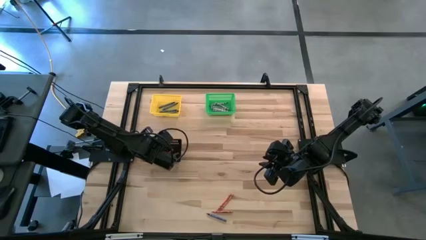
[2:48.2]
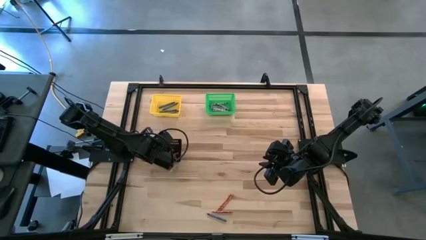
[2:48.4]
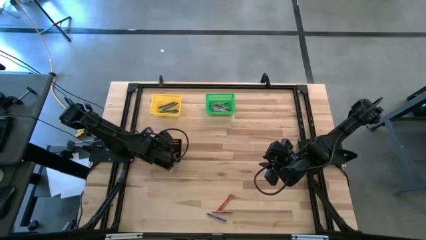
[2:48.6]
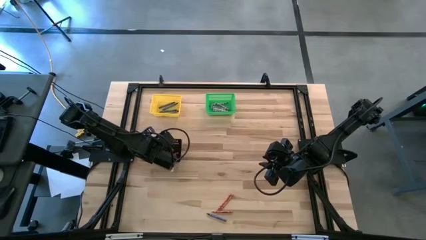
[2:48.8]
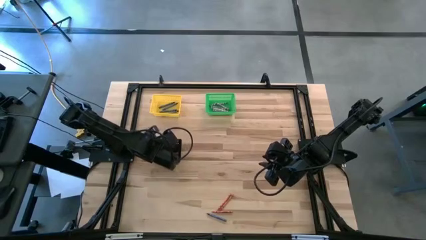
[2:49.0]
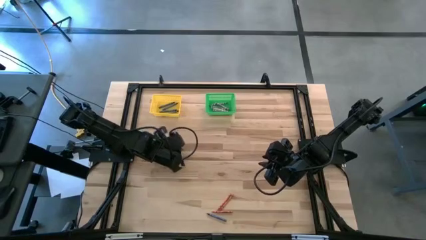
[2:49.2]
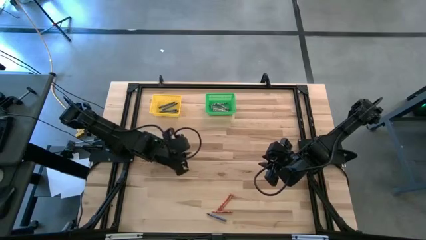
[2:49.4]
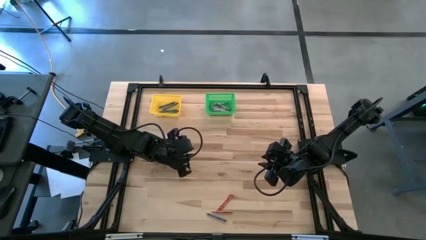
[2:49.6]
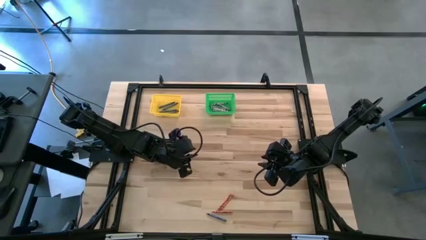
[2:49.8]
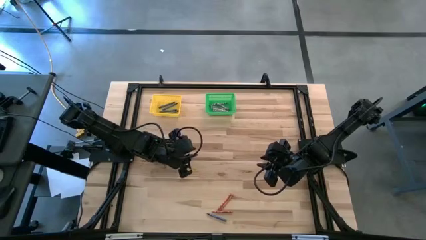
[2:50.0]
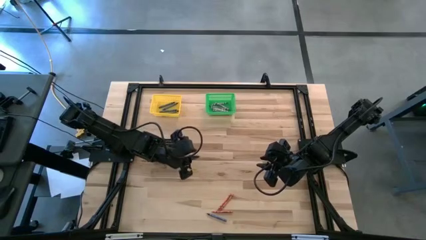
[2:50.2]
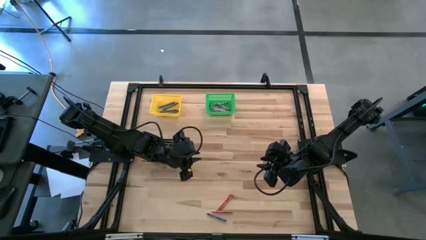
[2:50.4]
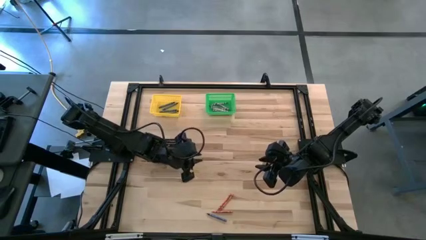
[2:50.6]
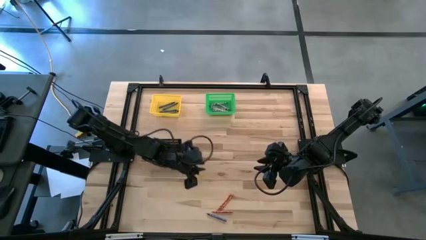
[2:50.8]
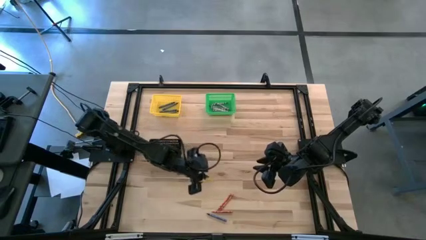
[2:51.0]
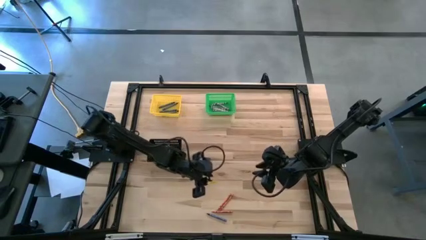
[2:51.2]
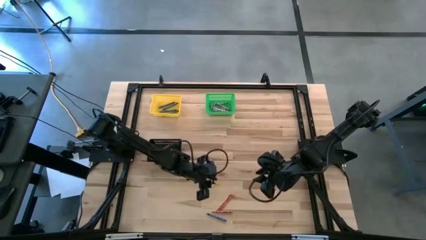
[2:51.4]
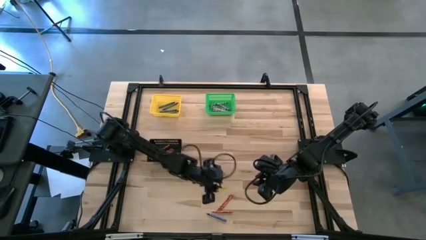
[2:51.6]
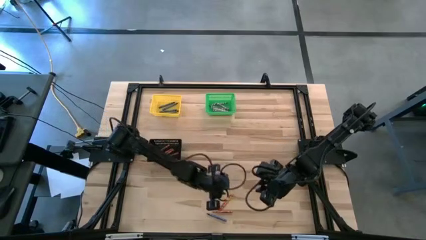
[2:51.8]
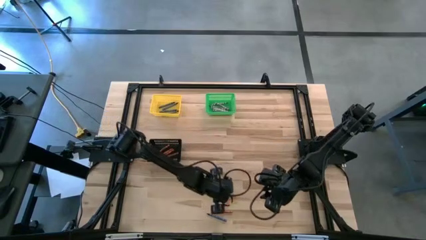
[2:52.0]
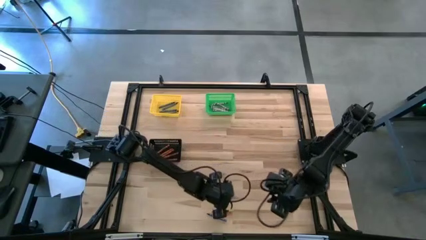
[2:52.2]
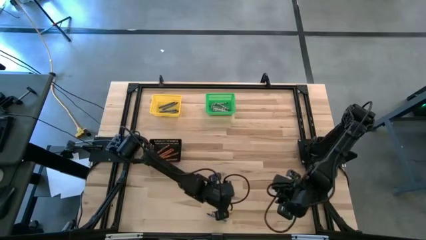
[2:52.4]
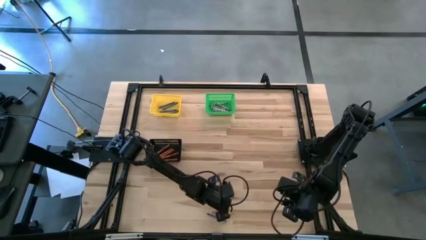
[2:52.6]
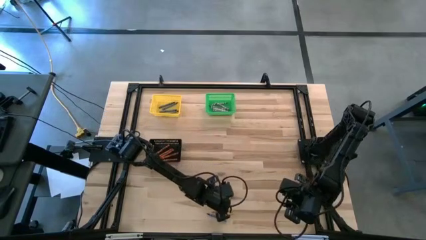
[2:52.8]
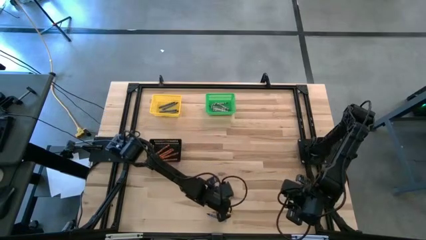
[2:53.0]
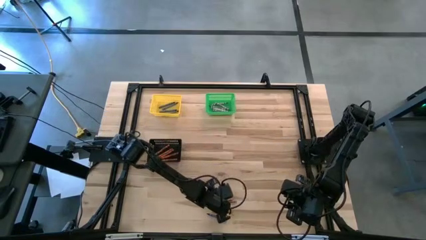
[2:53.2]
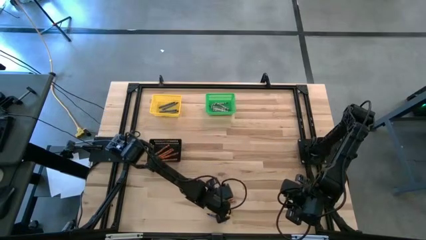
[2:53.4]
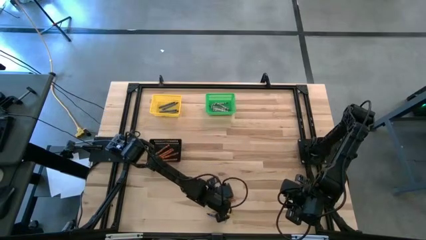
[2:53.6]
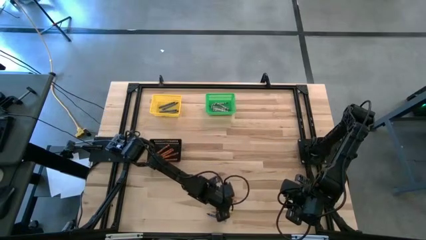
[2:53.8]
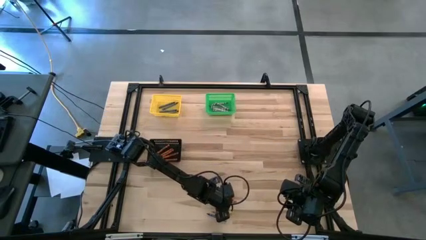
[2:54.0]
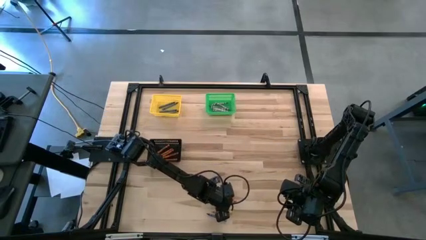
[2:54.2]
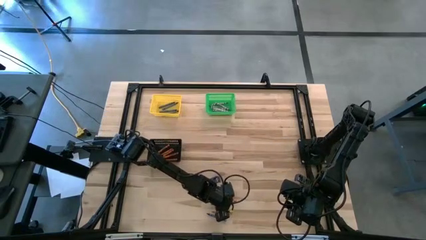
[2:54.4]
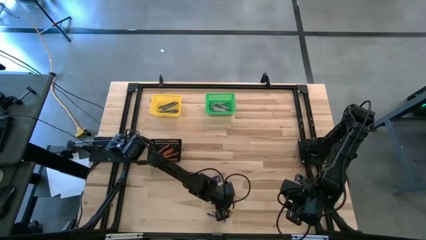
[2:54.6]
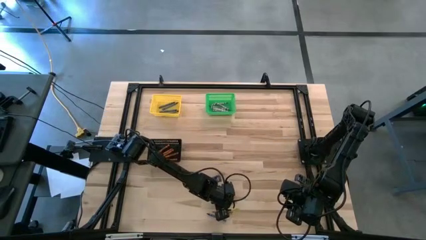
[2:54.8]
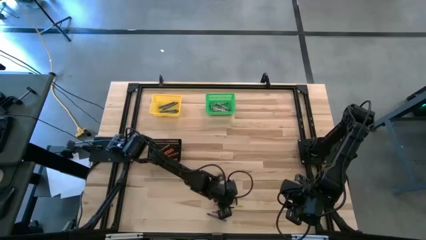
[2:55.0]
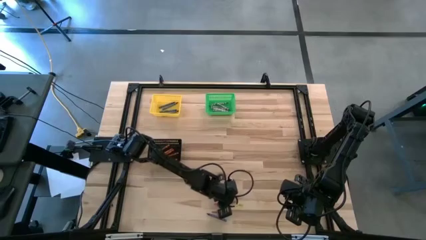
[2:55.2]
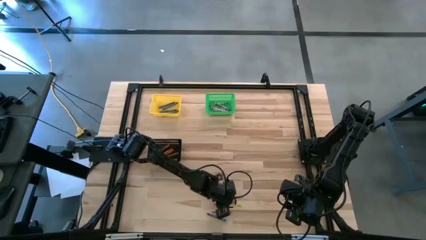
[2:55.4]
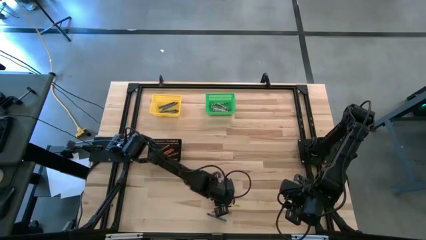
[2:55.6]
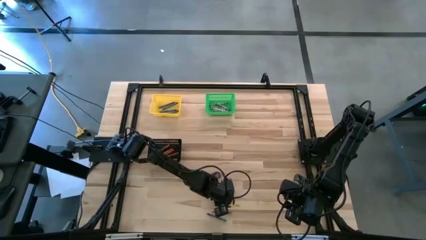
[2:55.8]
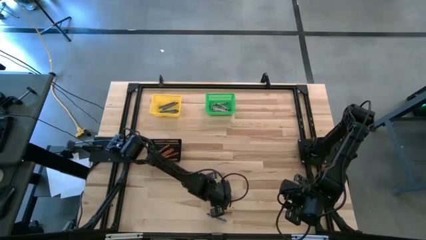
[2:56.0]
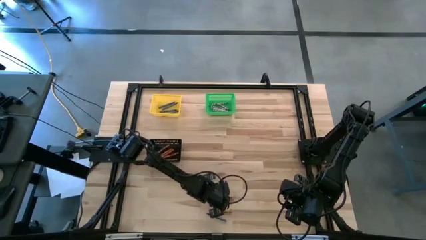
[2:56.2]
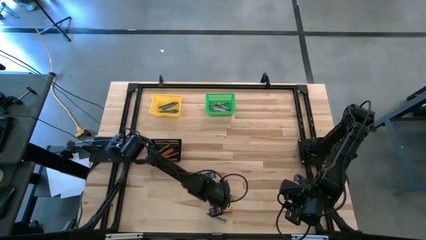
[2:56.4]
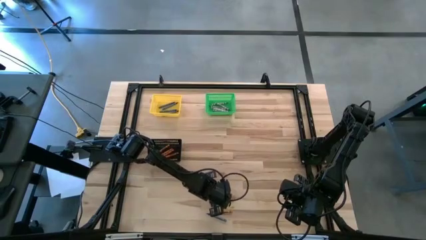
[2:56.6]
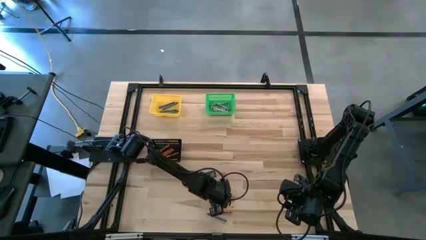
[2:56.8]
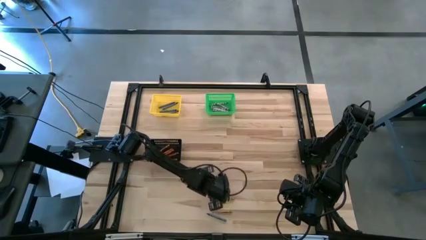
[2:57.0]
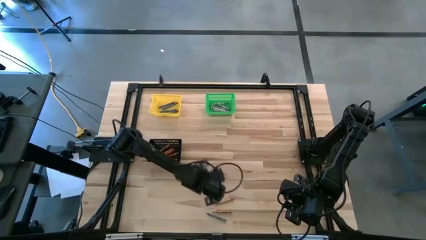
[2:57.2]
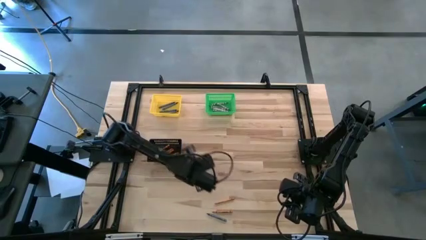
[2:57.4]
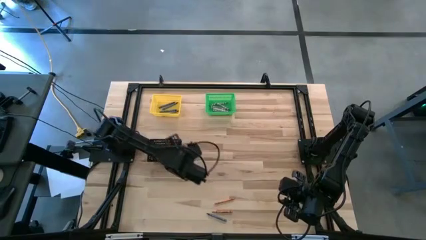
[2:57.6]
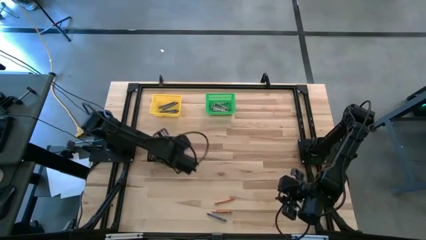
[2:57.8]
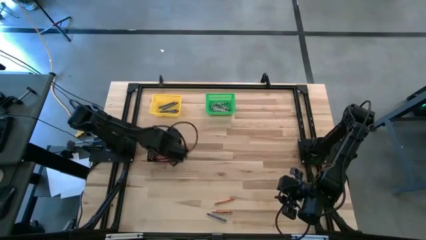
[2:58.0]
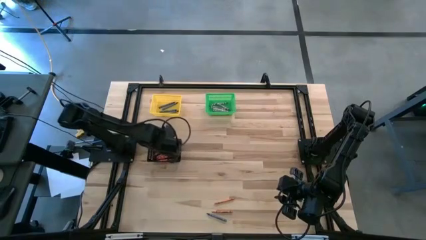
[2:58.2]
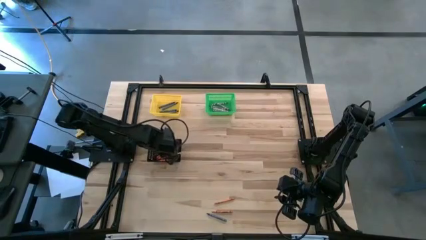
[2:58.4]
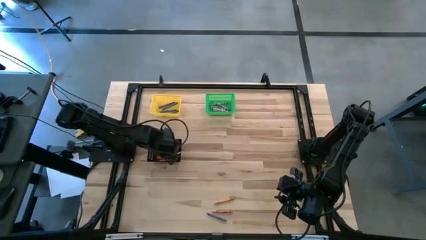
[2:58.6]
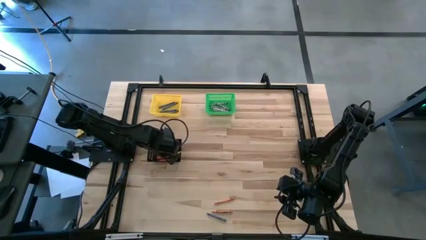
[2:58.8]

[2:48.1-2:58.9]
Task: Sort crayons
Put the orange crayon into the black bin

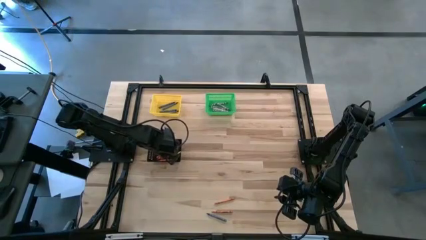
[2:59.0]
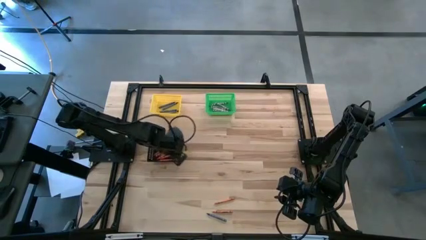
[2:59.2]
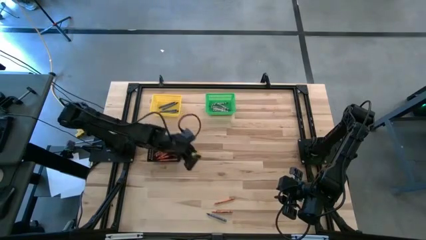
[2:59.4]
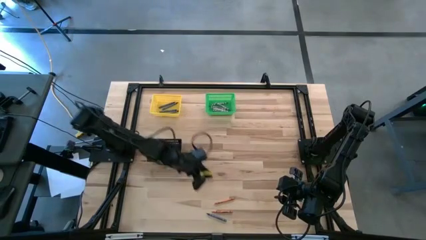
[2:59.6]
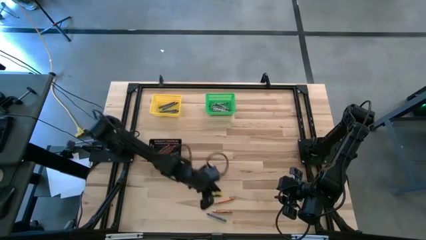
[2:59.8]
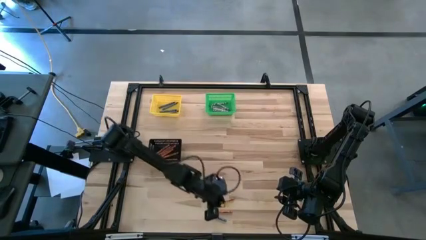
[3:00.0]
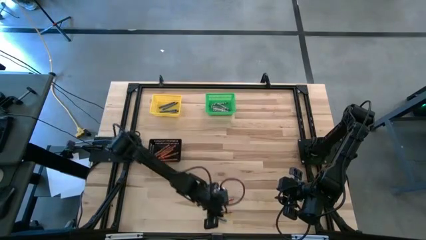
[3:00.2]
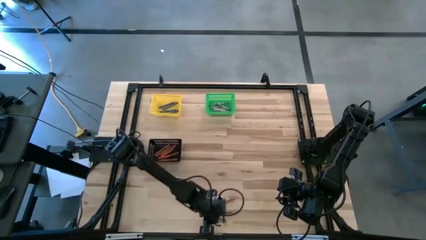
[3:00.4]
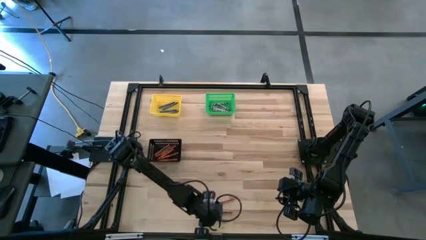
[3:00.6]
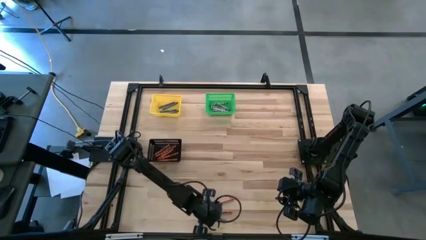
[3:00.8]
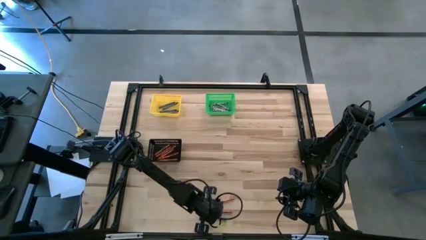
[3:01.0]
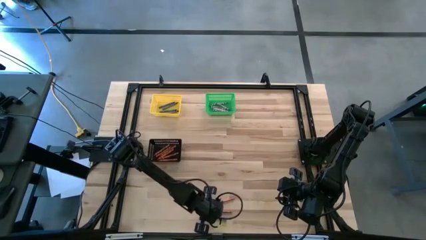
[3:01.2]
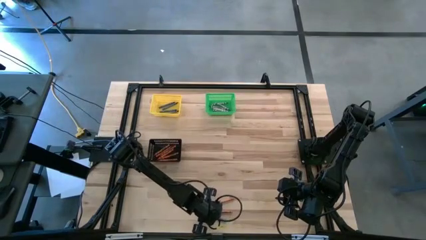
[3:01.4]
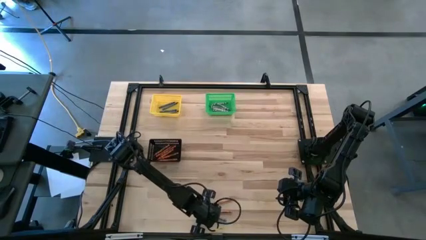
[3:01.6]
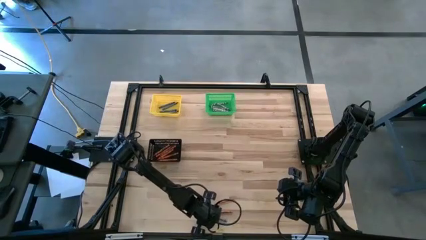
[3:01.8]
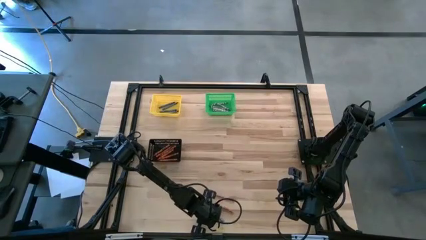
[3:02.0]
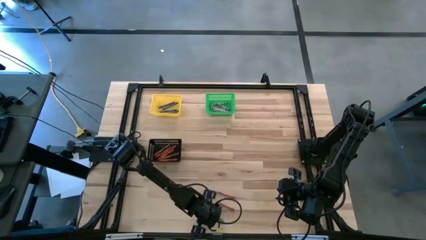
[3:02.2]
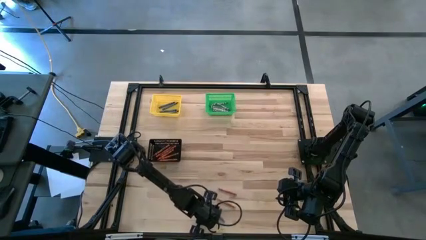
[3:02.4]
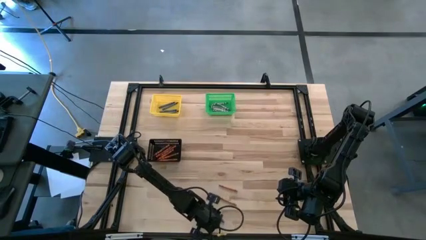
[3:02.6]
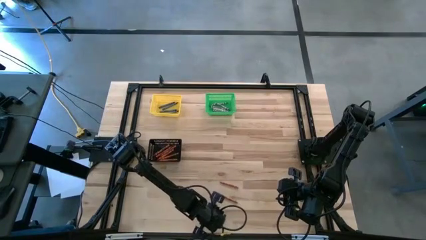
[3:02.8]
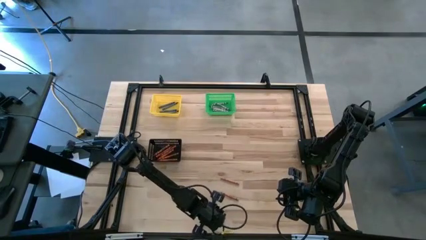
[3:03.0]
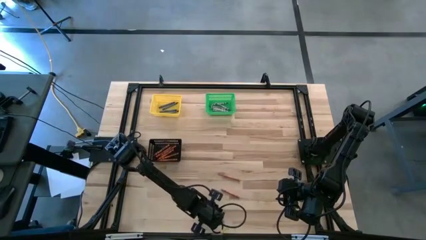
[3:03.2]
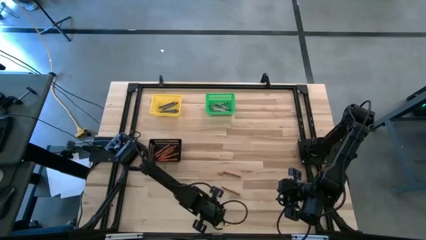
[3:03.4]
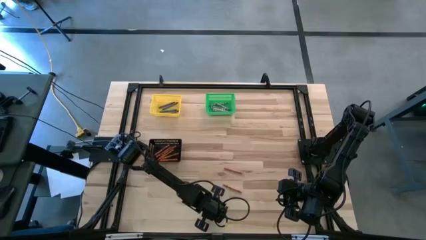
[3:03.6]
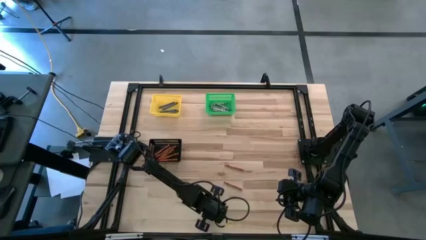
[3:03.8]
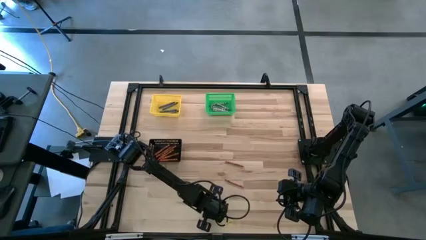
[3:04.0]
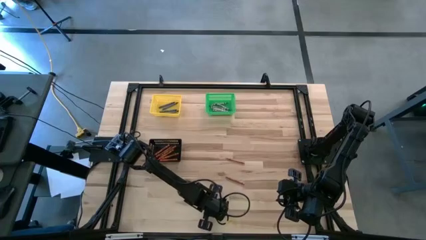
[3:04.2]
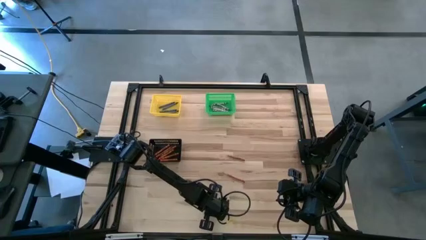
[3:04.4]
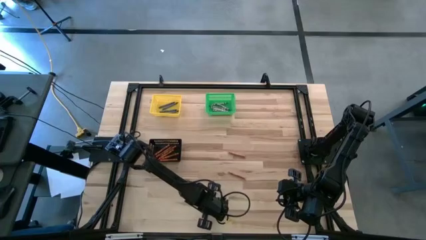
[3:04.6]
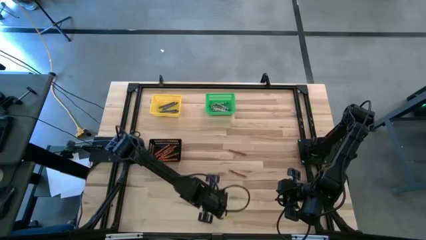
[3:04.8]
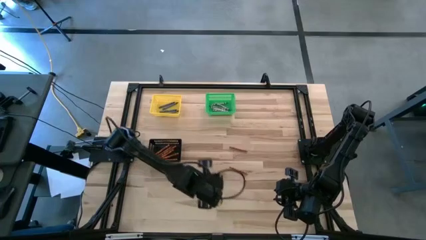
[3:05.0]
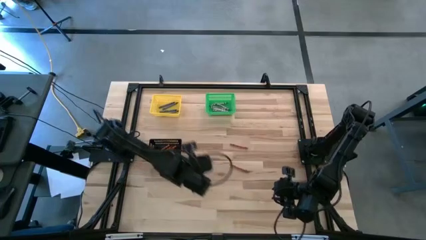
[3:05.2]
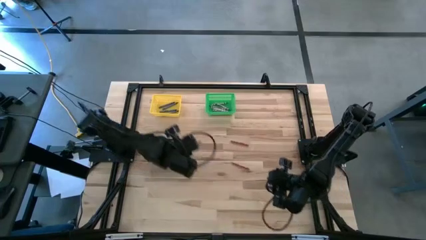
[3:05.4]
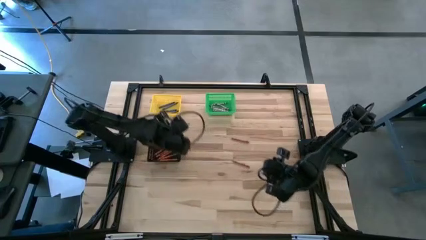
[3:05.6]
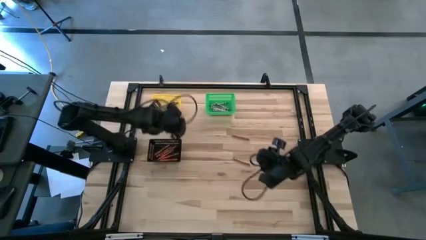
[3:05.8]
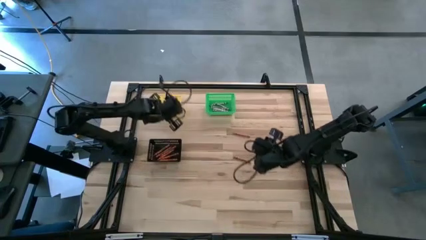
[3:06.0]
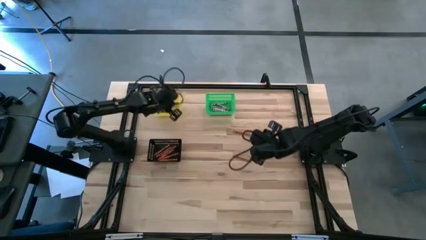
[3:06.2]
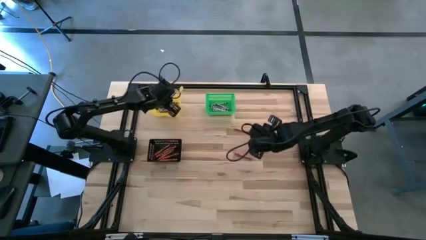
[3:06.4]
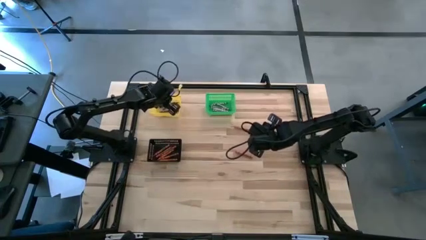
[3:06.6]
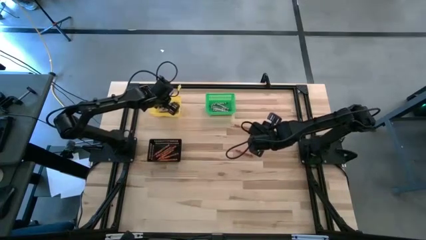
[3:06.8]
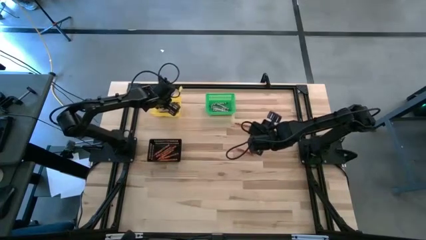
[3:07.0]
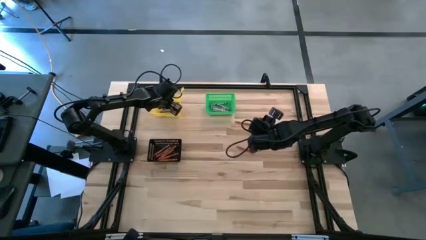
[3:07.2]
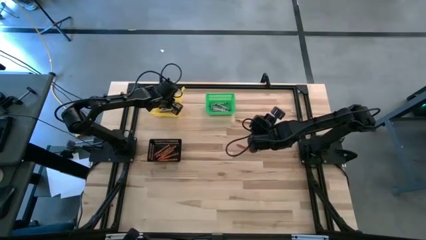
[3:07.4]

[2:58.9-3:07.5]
Put the blue crayon into the yellow bin
